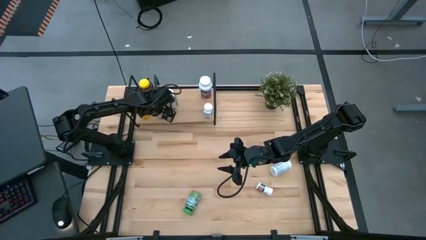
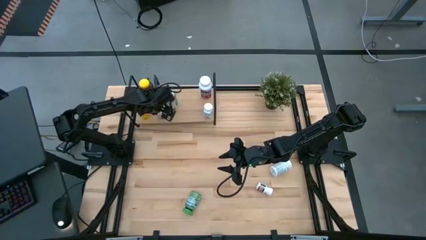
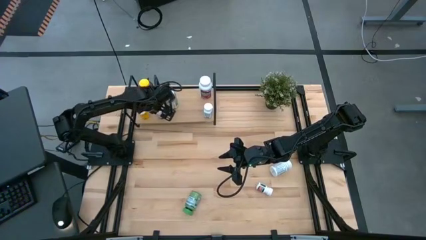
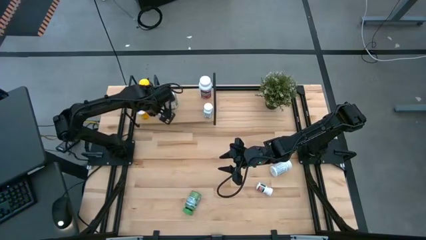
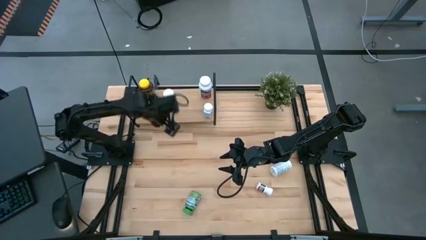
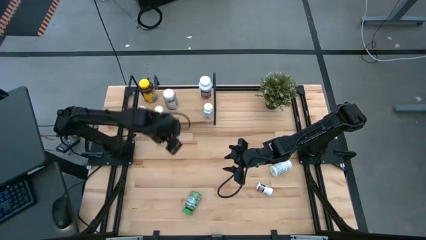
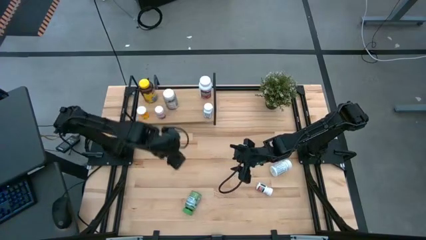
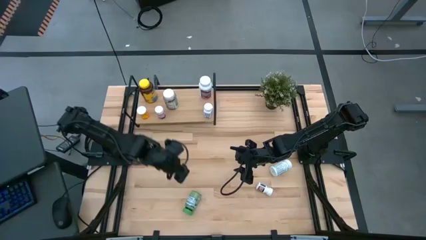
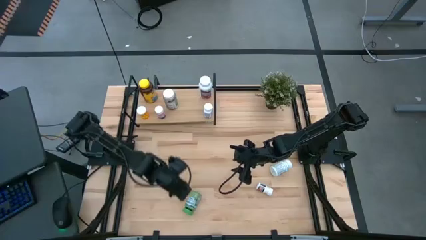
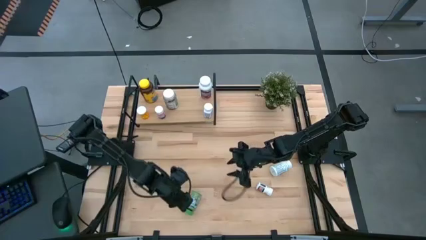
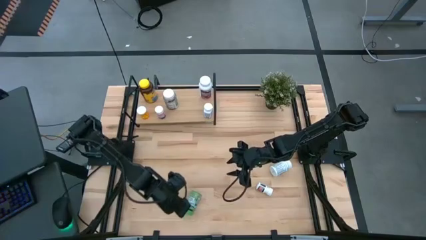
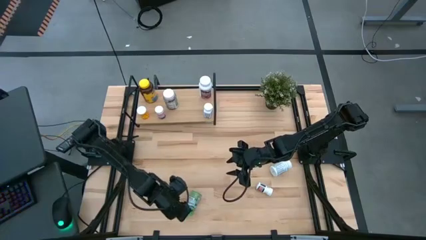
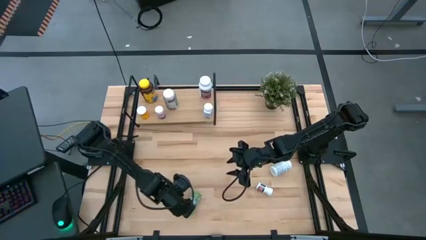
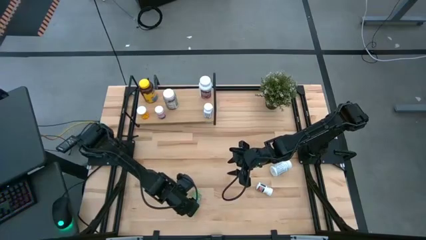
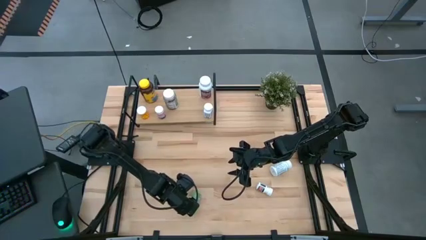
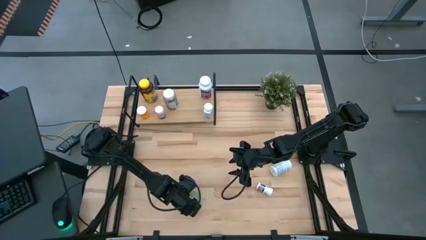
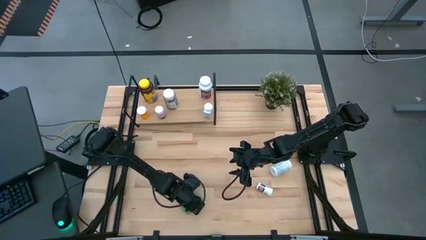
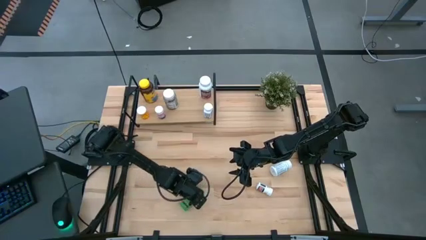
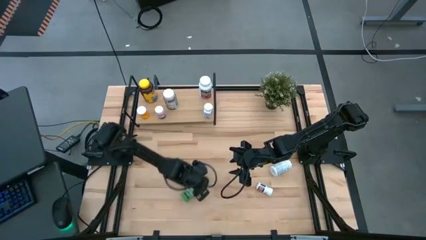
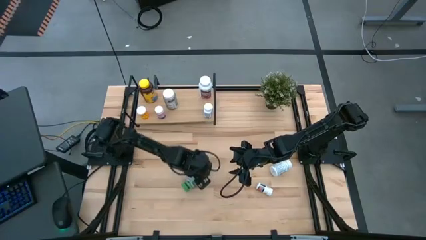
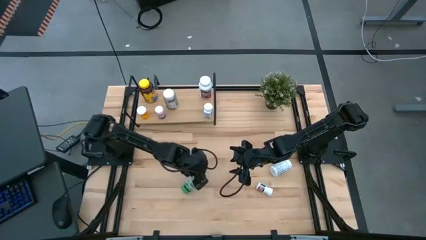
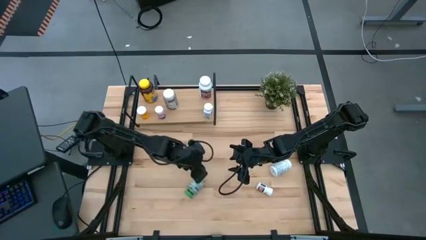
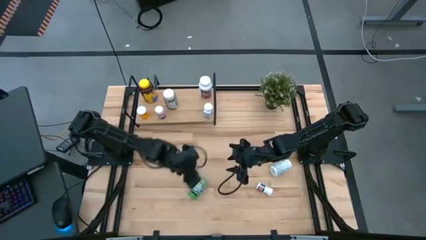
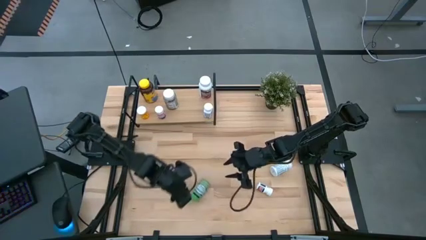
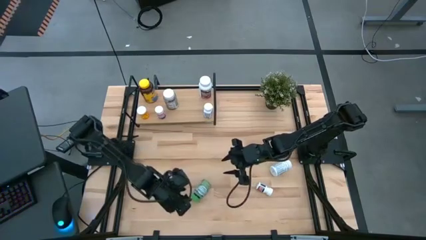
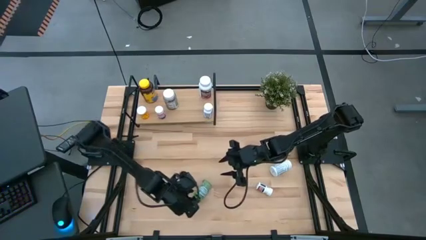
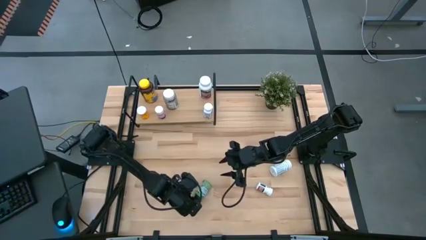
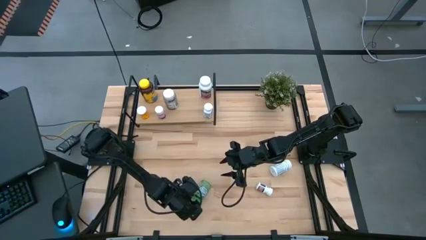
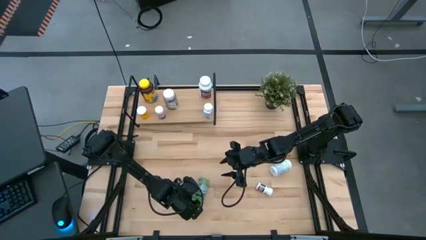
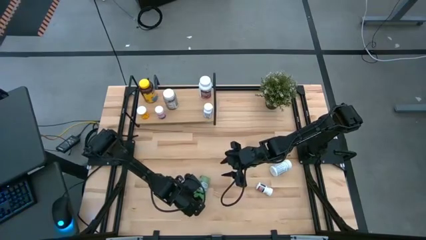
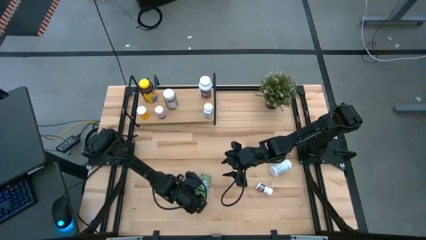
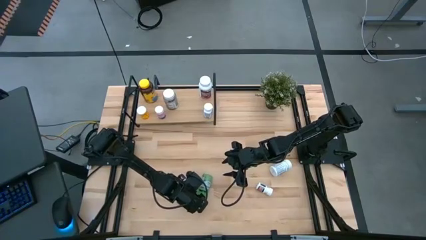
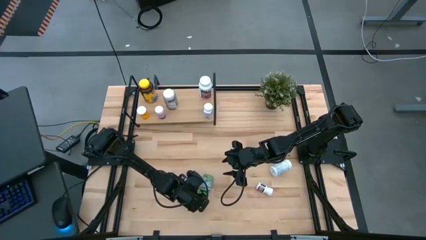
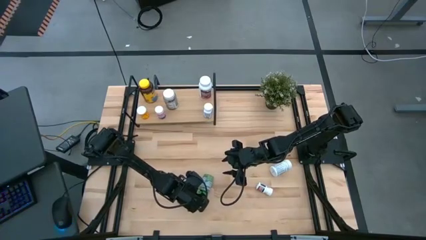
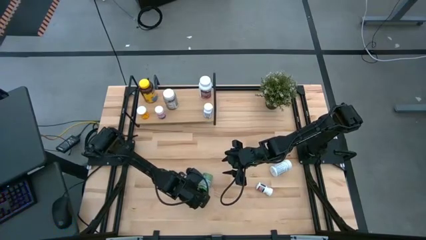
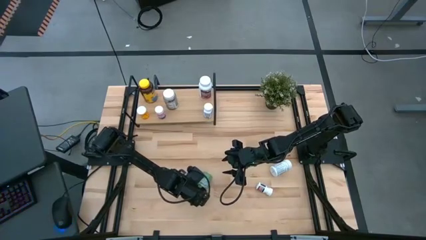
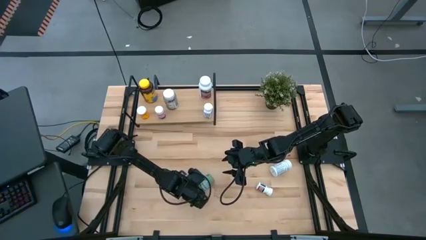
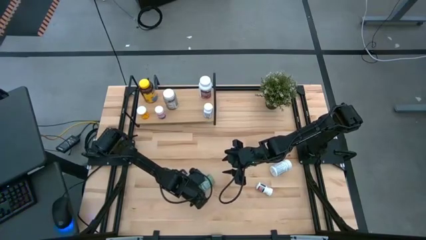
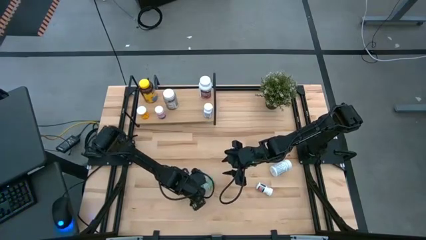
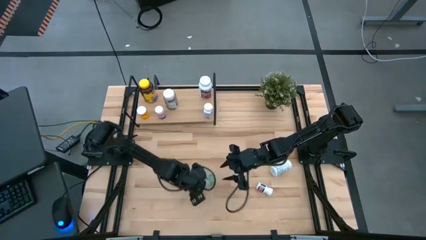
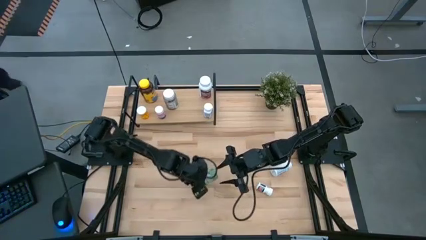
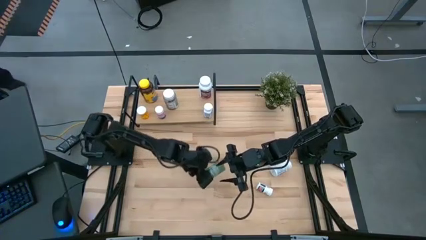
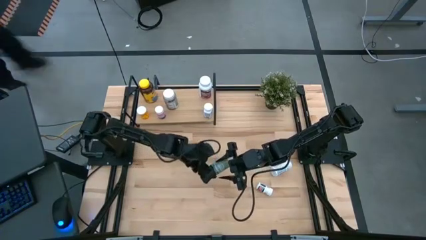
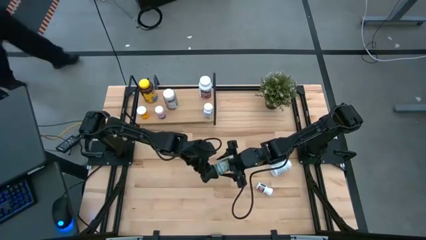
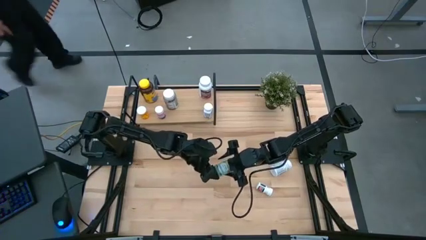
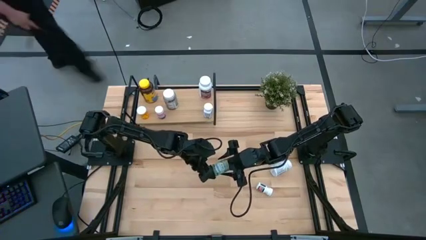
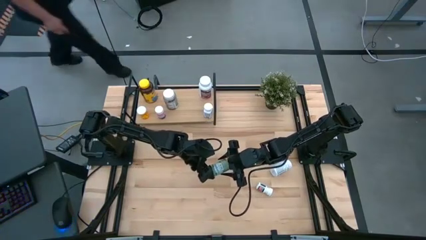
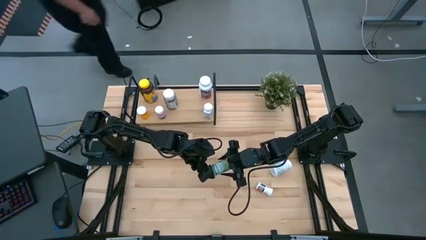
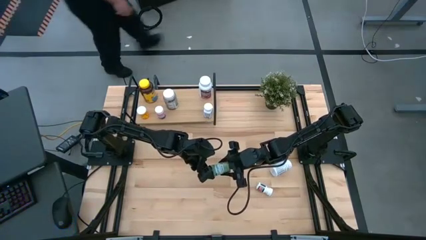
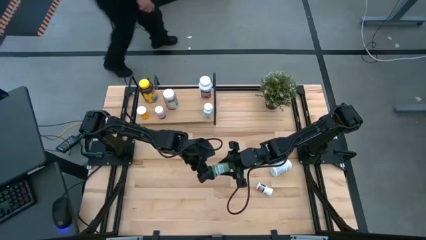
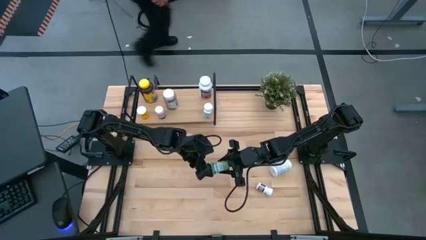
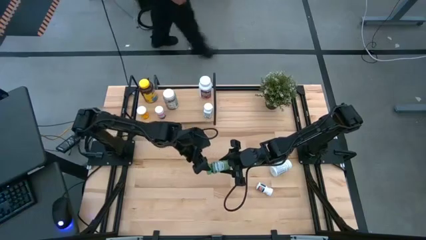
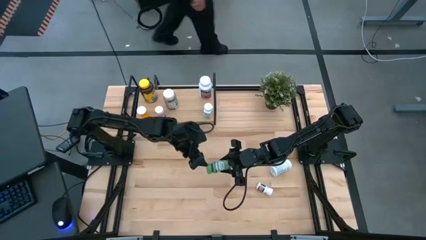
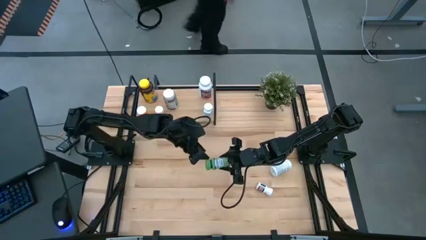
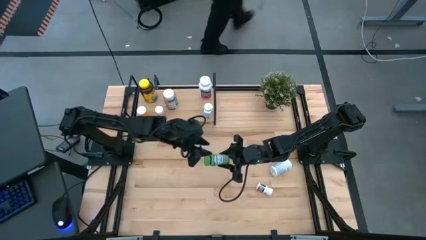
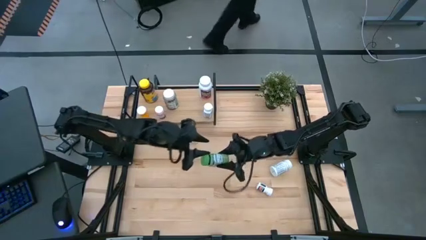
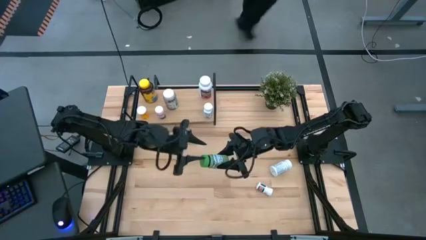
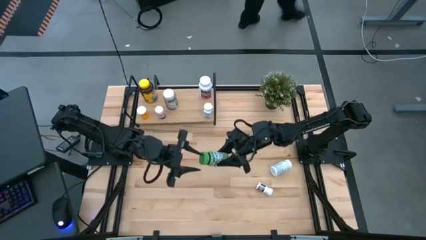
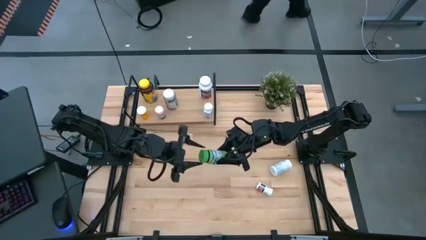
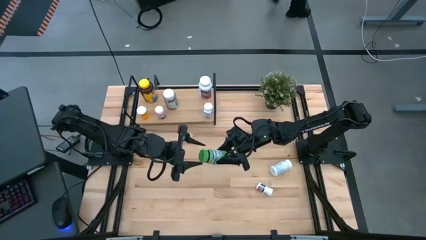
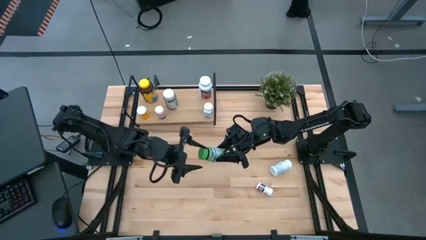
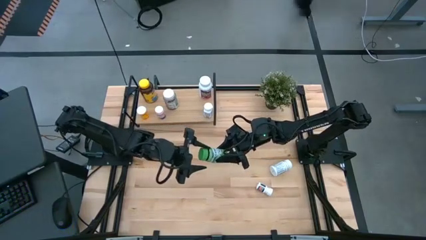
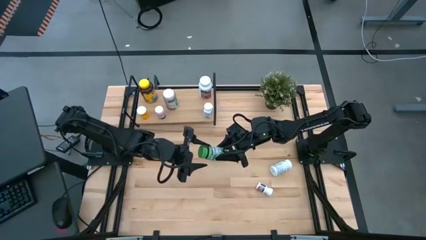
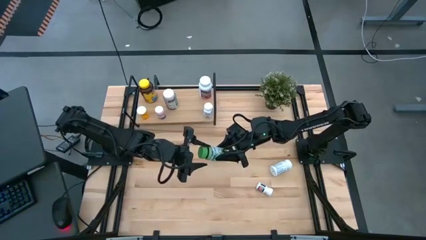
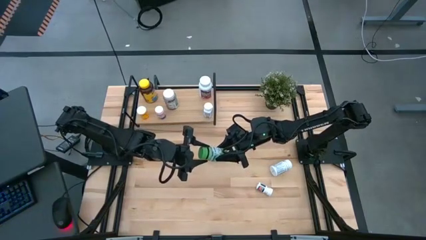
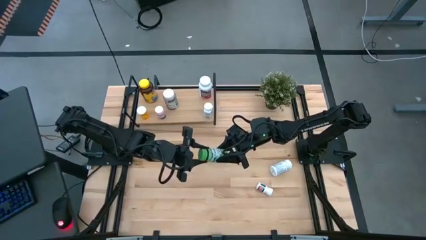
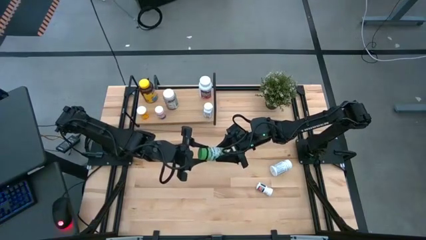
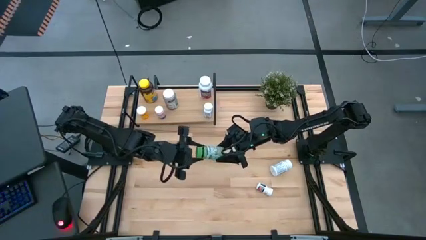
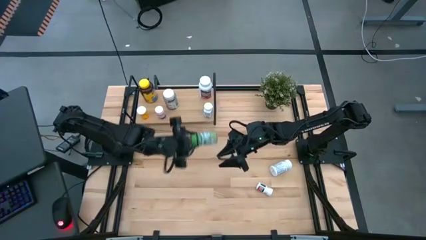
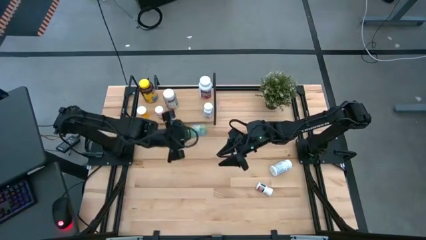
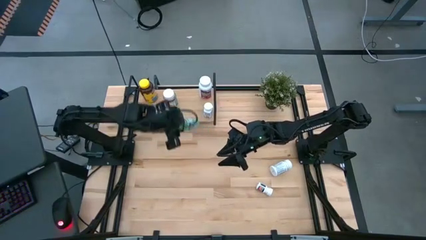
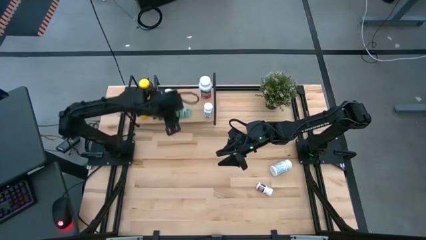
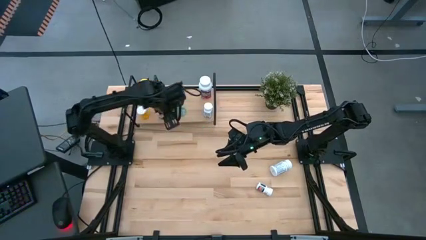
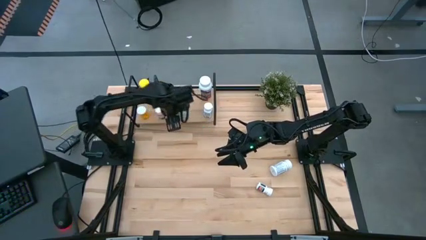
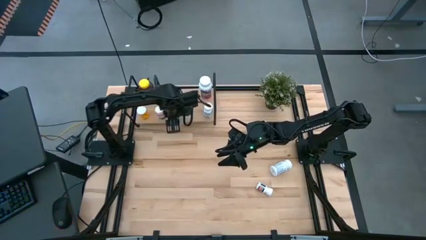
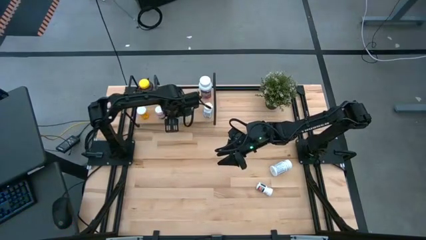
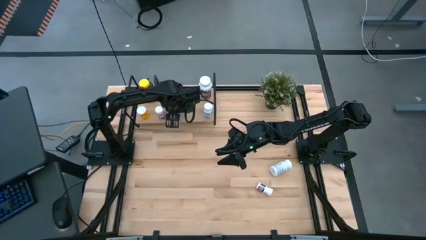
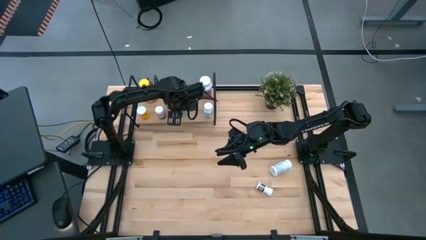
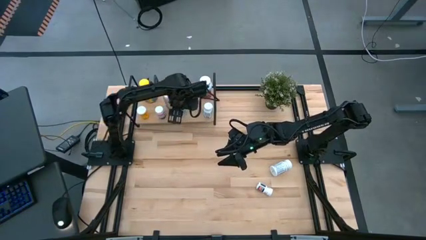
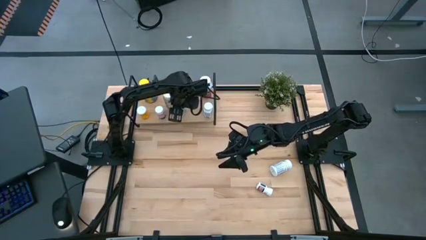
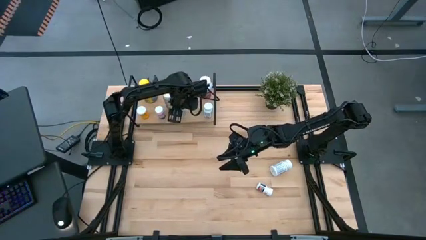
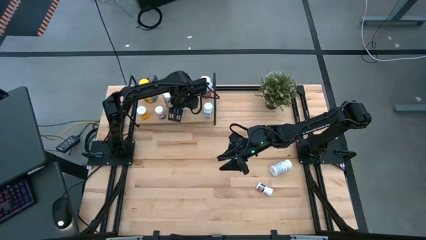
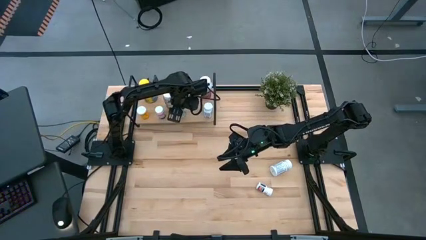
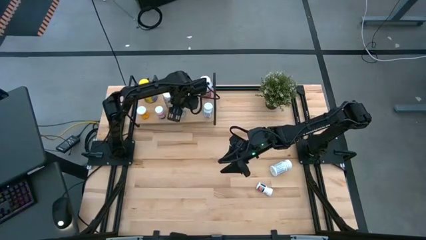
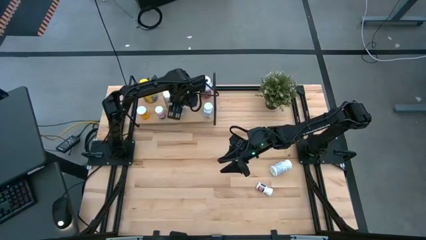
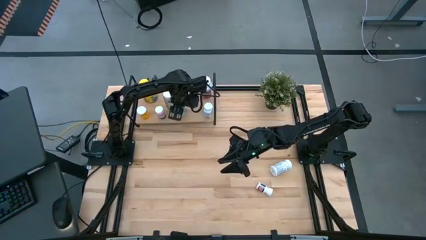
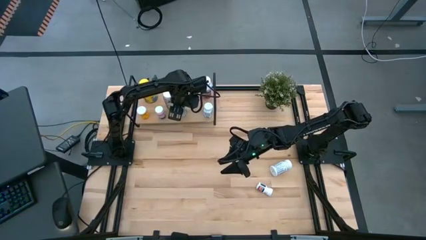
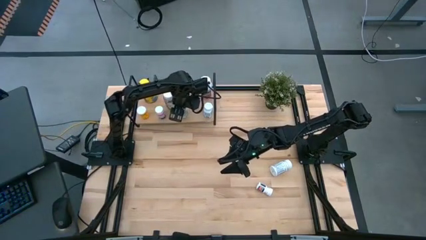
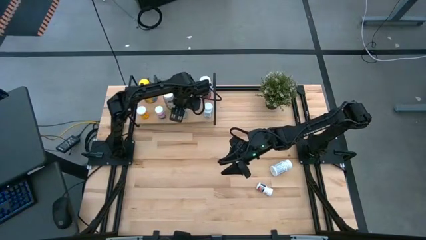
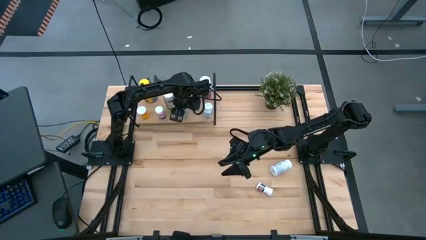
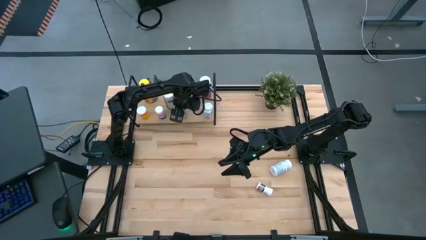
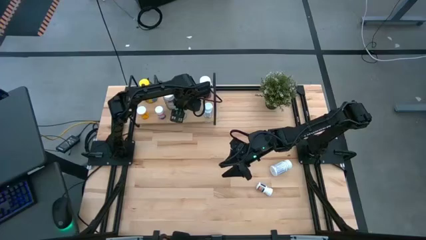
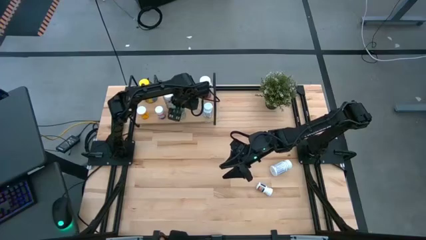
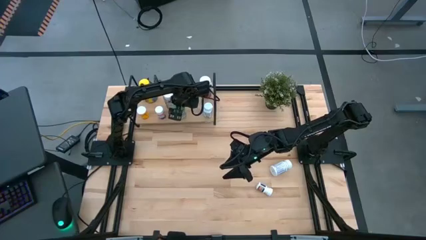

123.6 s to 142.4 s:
Task: Pick and place medicine bottles onto shelf by color
Put the light green medicine bottle on the shelf
